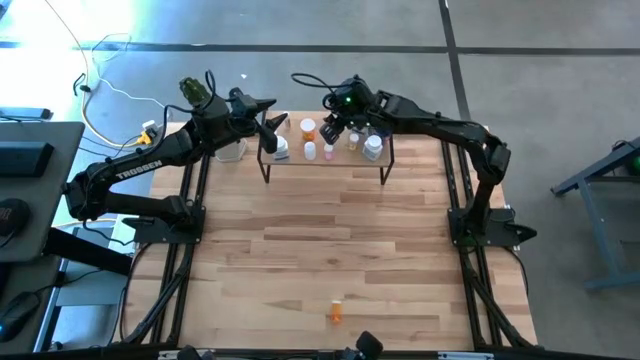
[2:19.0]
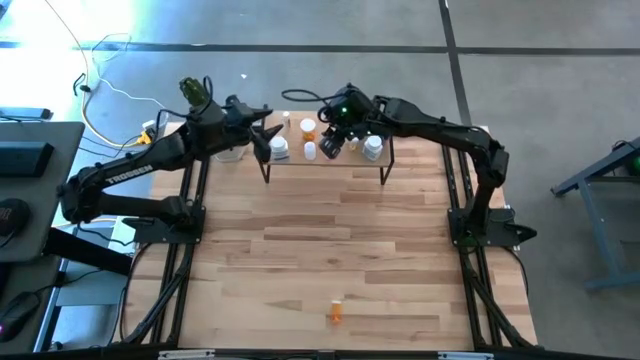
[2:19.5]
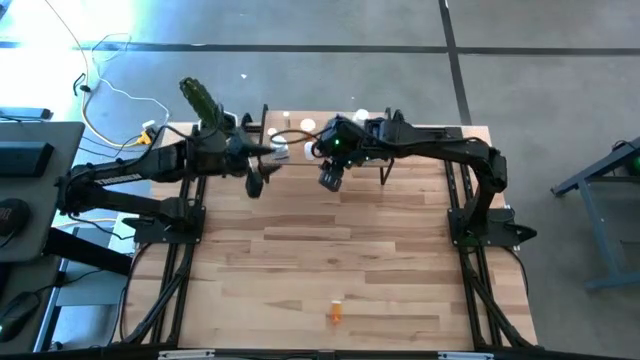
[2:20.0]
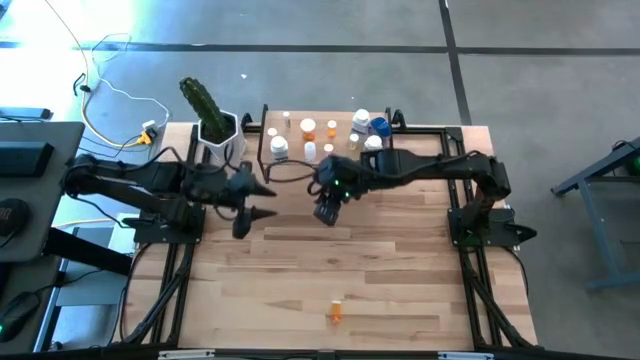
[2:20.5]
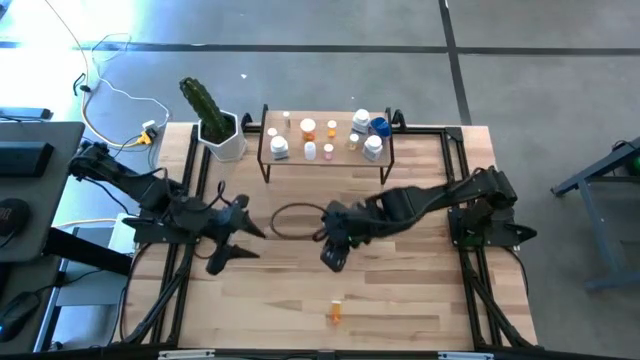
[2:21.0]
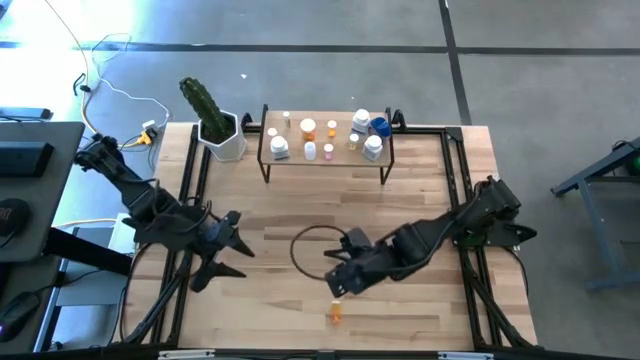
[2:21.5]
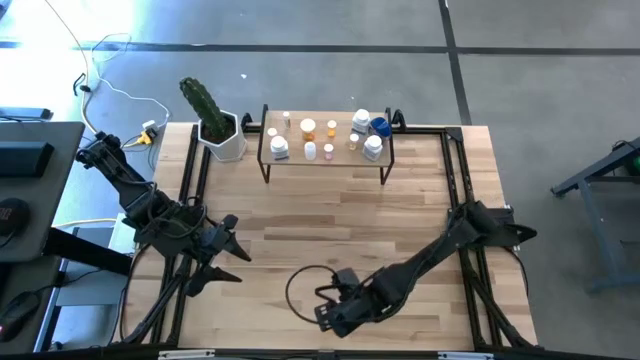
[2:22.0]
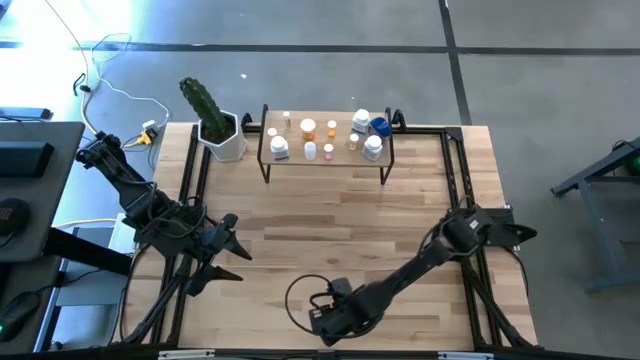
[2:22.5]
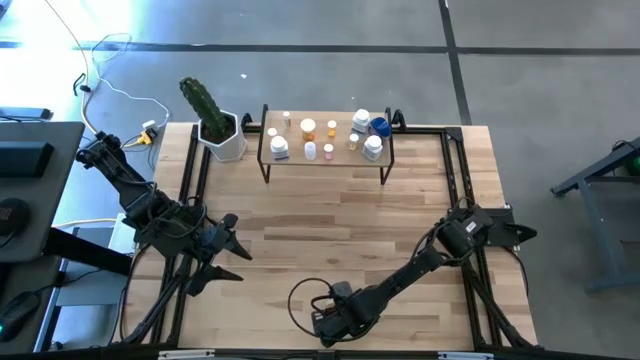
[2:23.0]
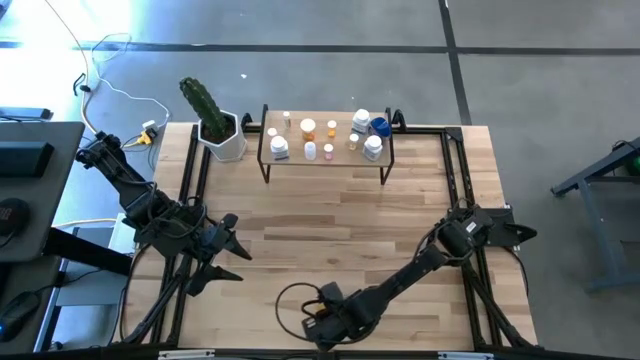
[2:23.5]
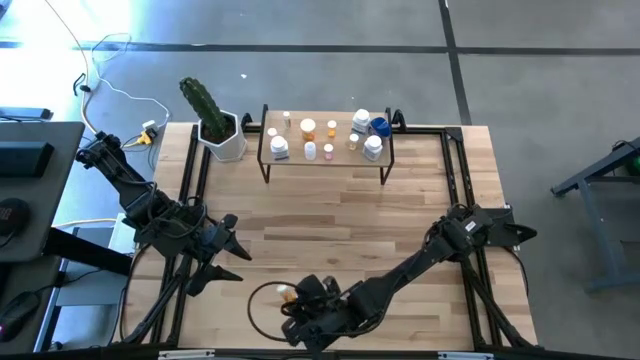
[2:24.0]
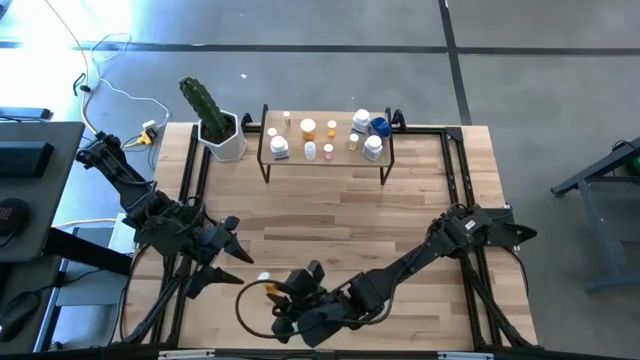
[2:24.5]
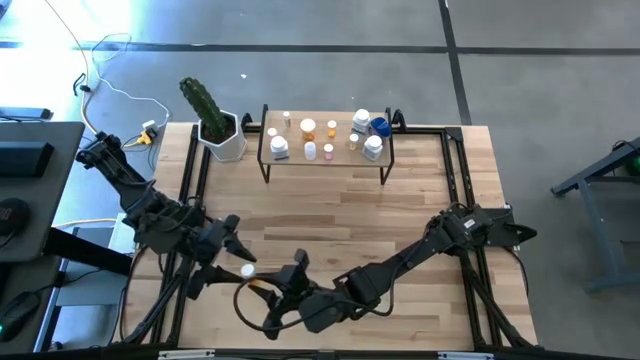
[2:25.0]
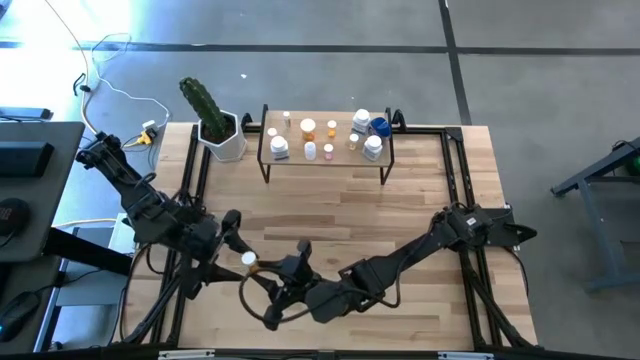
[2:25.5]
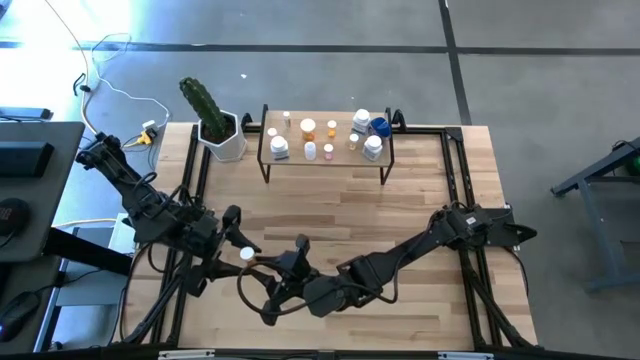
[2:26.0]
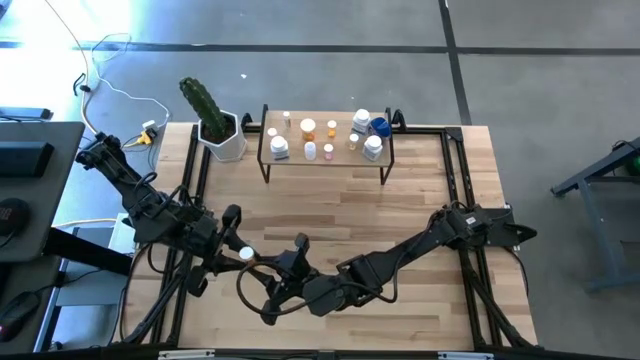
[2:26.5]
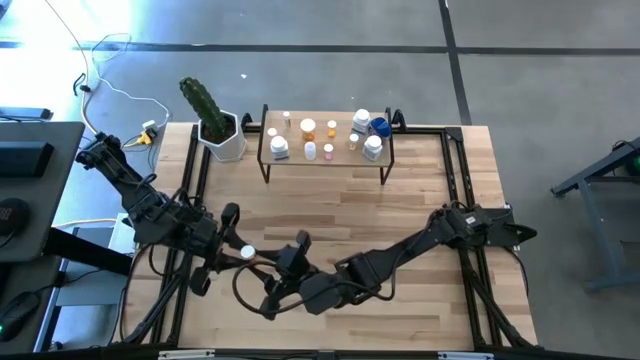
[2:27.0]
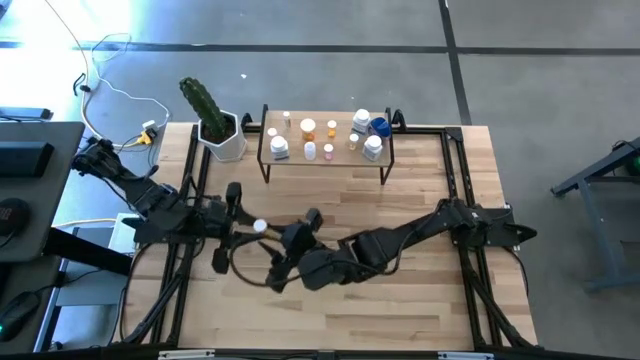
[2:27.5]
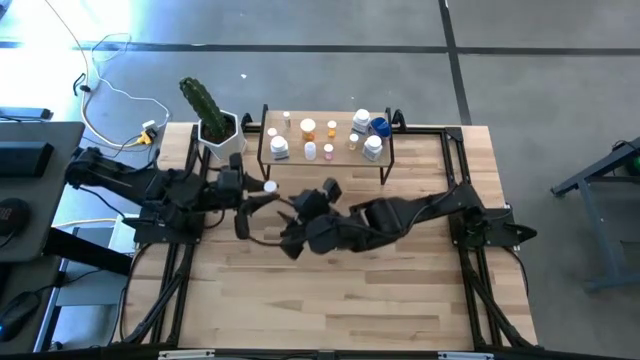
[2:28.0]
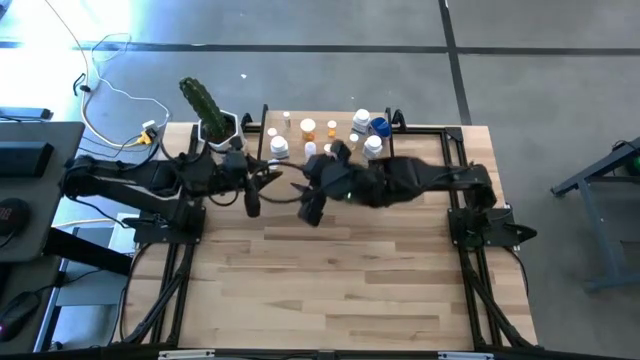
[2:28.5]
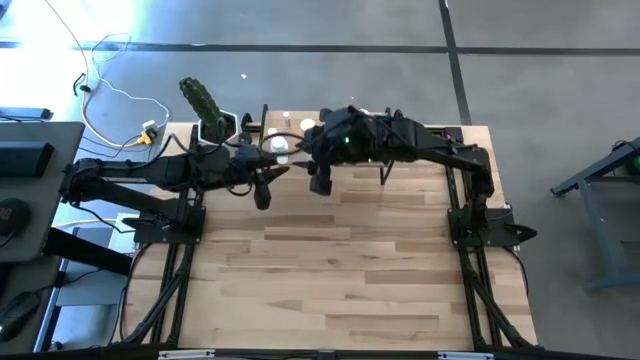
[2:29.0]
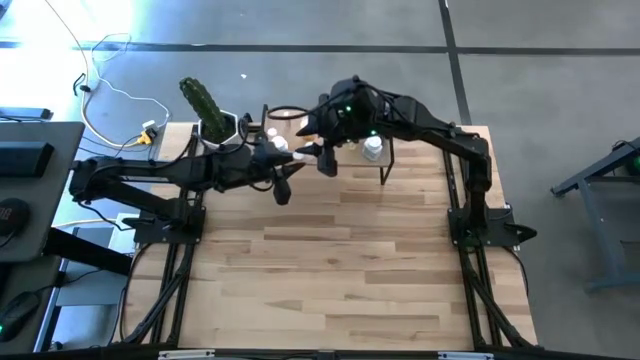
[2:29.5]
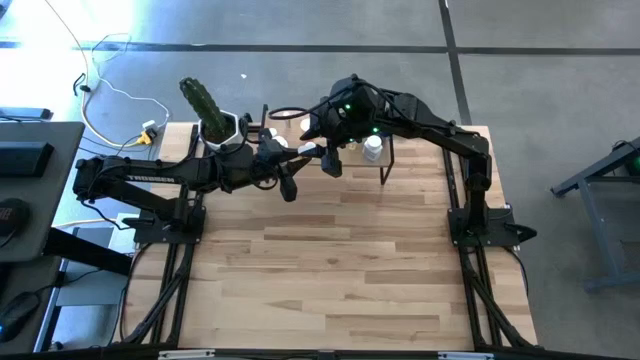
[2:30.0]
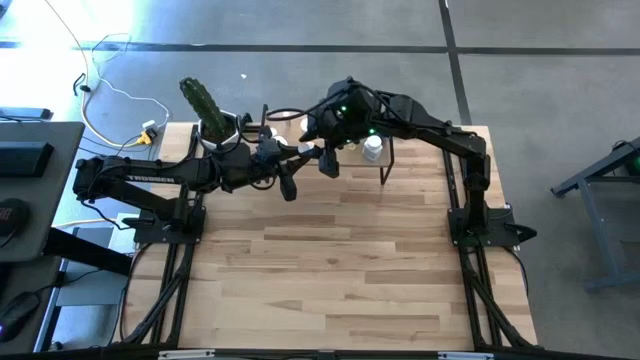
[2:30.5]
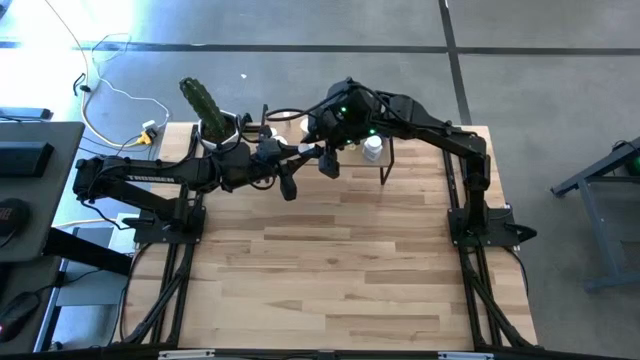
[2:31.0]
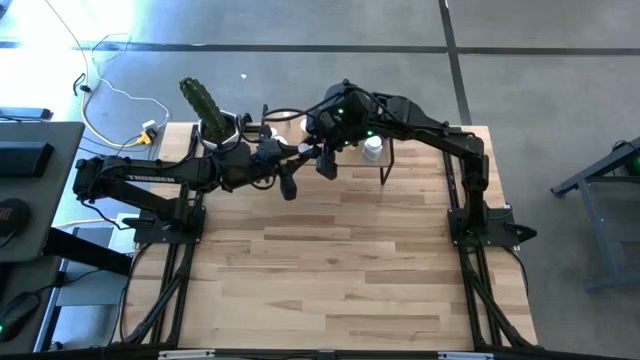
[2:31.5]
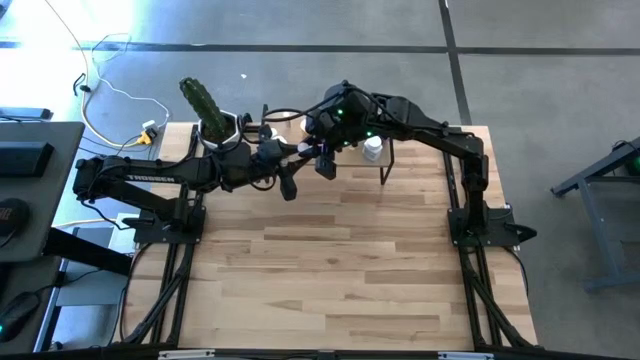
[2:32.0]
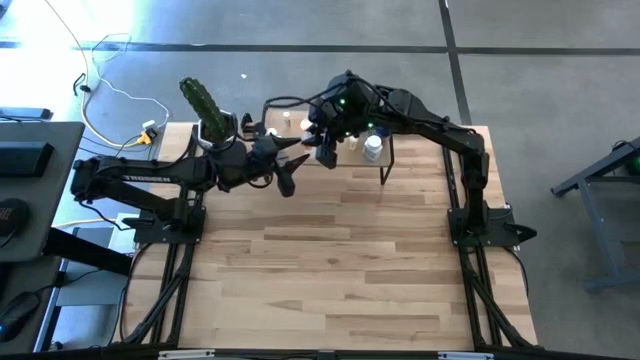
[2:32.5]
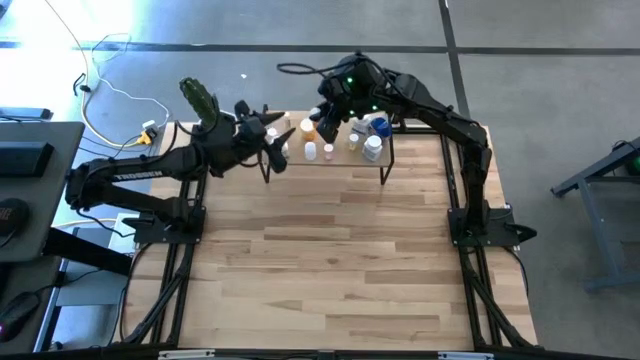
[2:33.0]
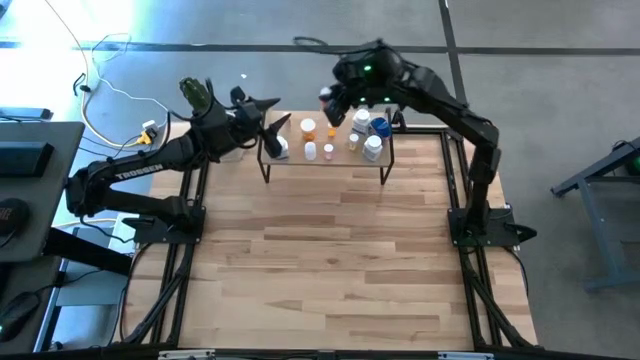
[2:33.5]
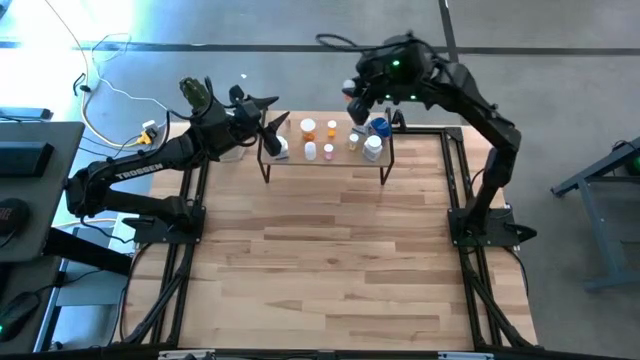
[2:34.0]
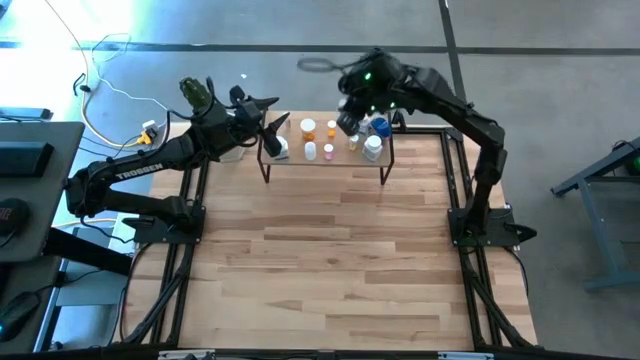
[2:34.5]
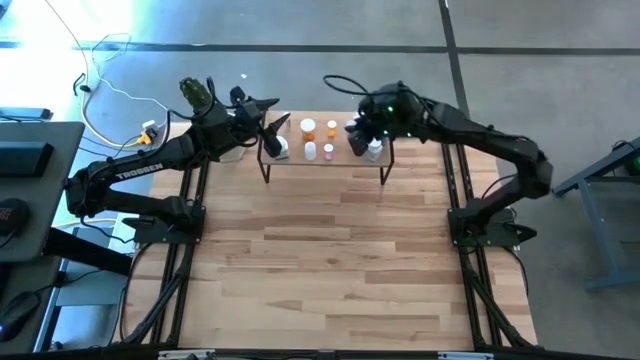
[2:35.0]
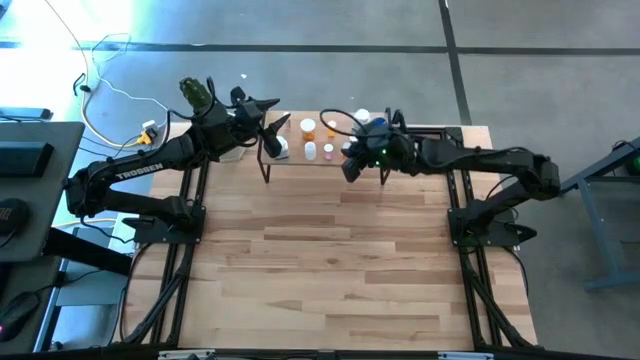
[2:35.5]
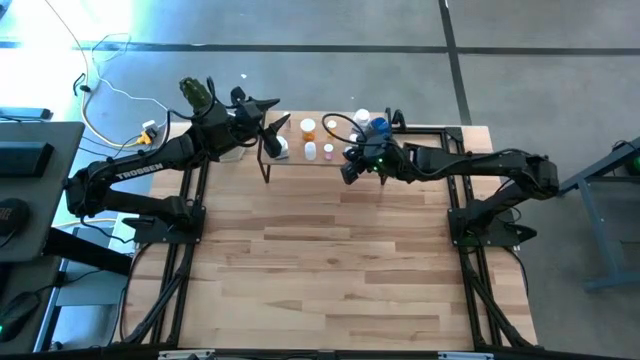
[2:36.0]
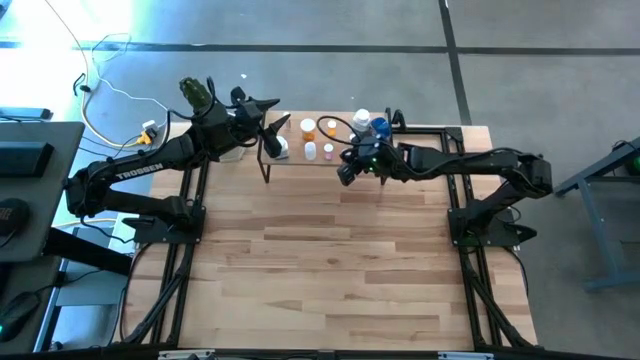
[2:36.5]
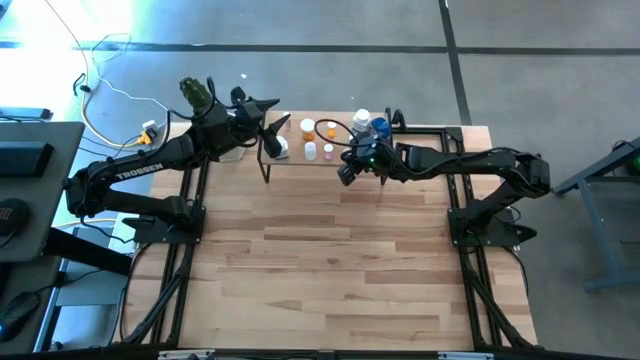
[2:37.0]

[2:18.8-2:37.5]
Task: Pick and place medicine bottles onto shelf by color
Put the small orange pill bottle on the shelf

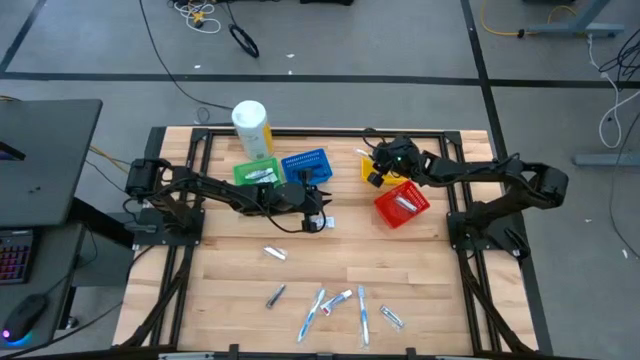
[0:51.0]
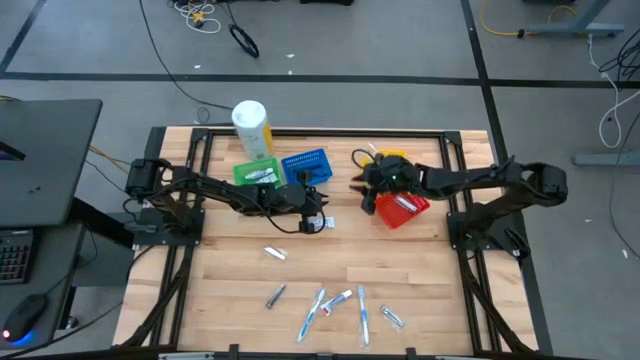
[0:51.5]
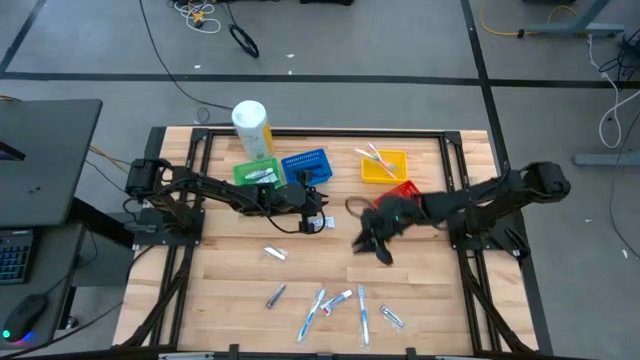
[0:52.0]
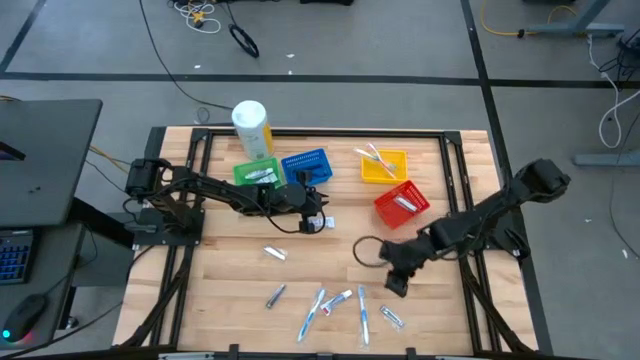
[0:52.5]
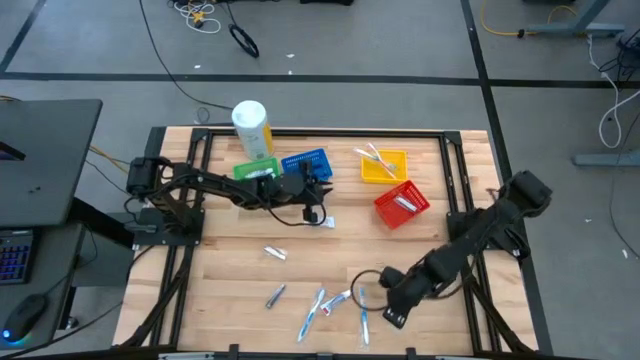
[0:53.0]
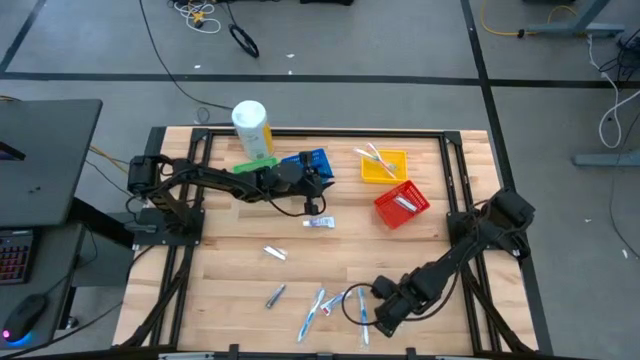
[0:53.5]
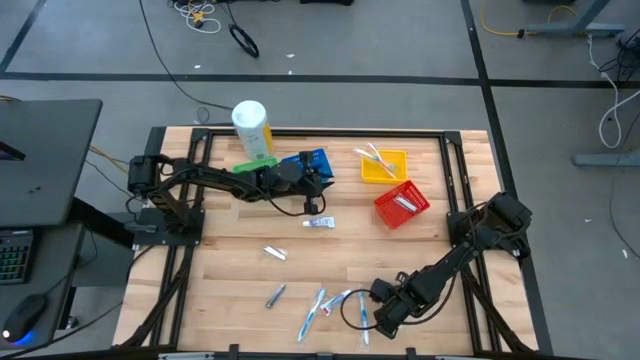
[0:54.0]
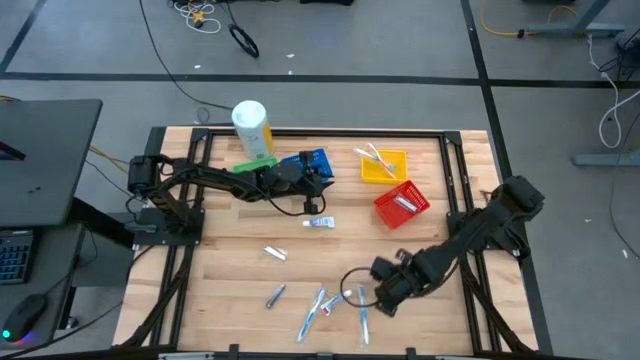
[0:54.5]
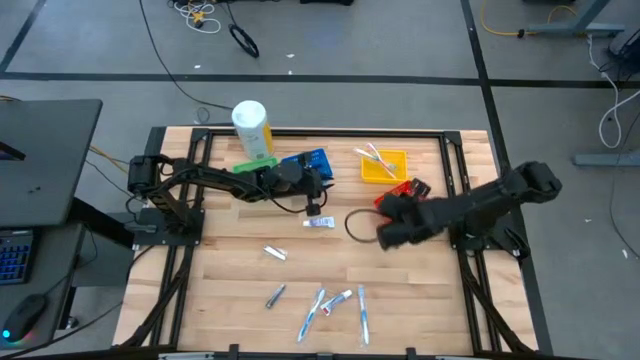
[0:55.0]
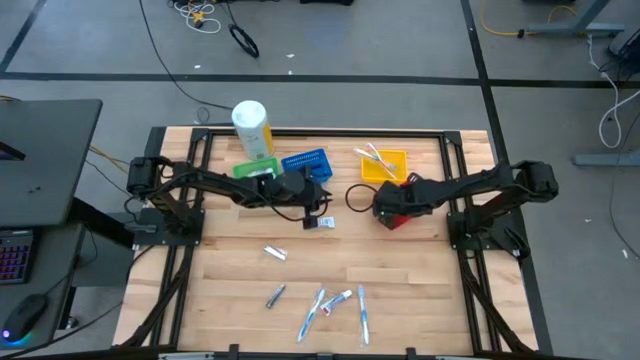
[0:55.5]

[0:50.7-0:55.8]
Task: Pick & Place Travel size toiletries
Put the silver nail cutter into the red bin
